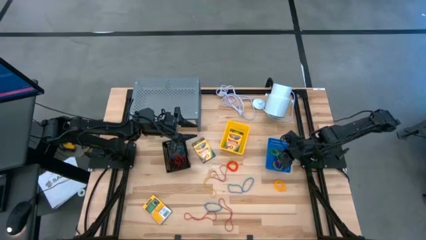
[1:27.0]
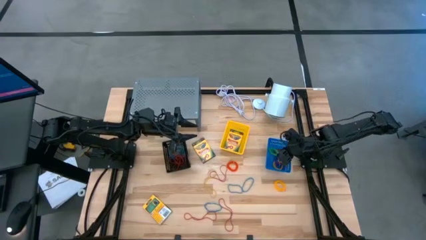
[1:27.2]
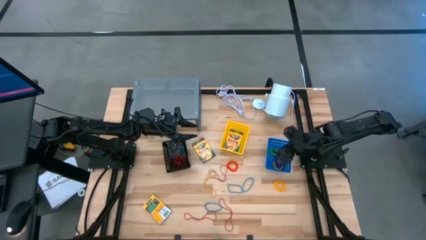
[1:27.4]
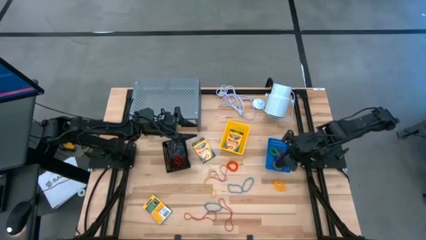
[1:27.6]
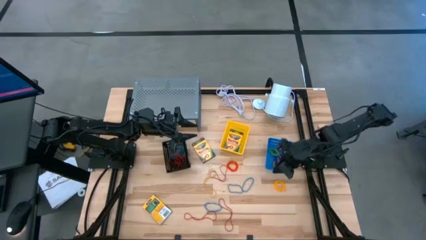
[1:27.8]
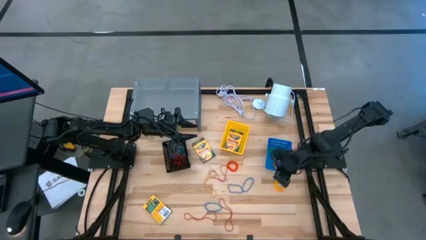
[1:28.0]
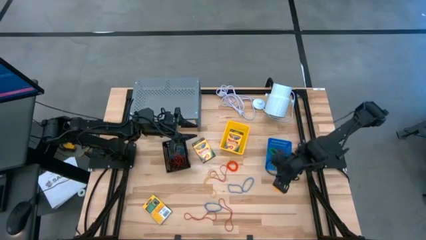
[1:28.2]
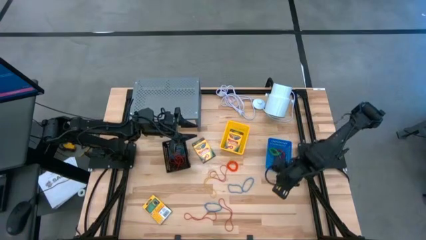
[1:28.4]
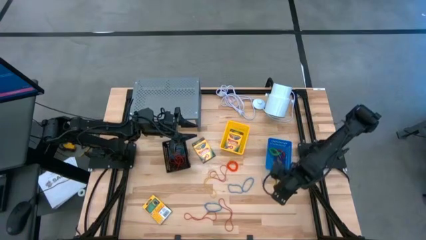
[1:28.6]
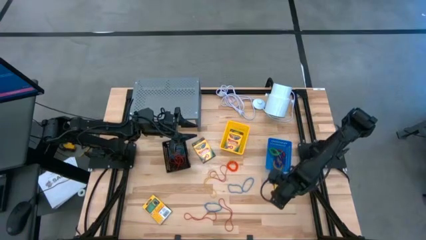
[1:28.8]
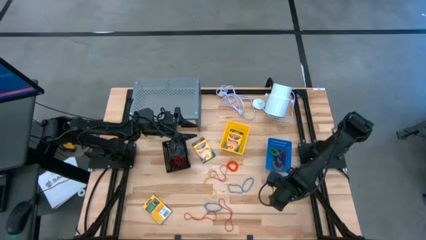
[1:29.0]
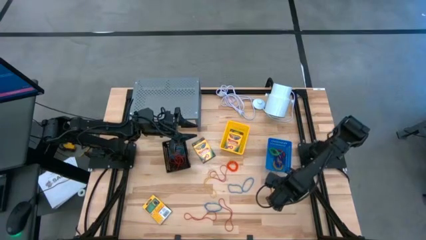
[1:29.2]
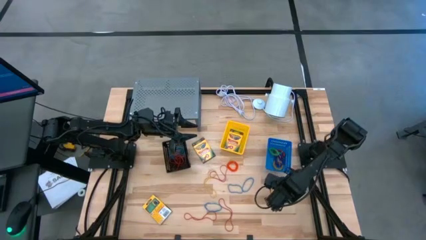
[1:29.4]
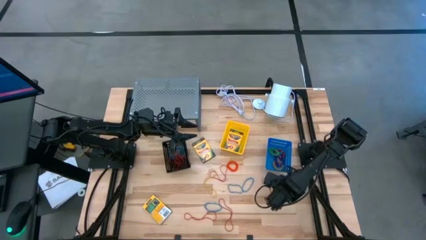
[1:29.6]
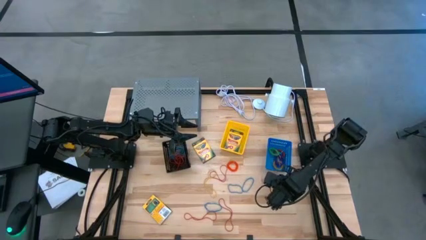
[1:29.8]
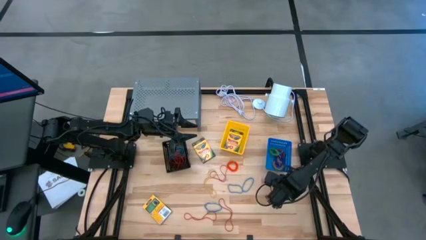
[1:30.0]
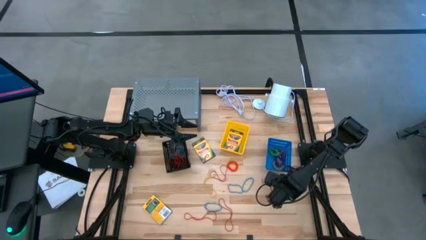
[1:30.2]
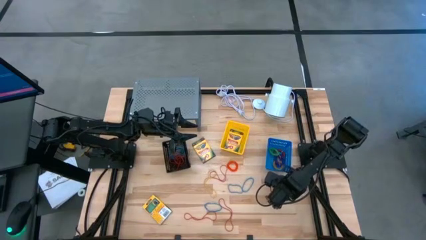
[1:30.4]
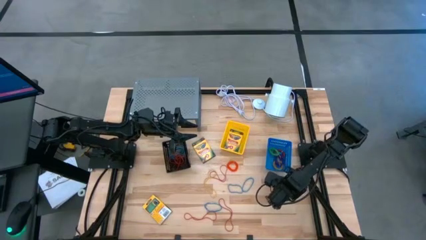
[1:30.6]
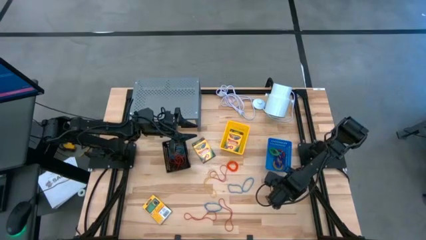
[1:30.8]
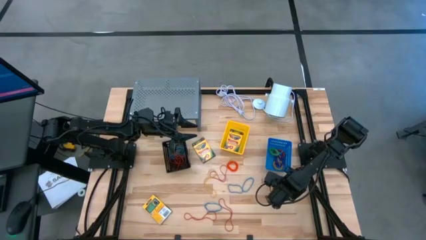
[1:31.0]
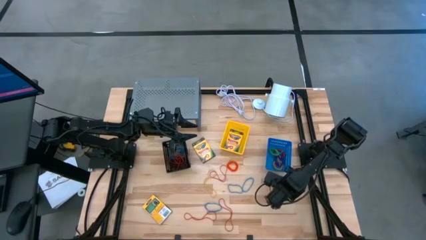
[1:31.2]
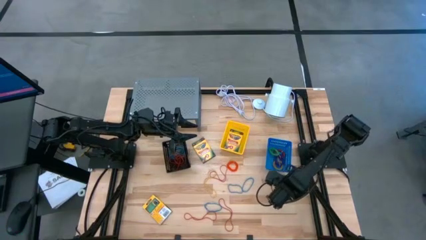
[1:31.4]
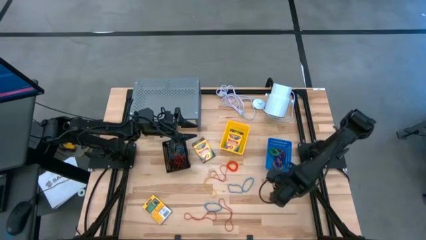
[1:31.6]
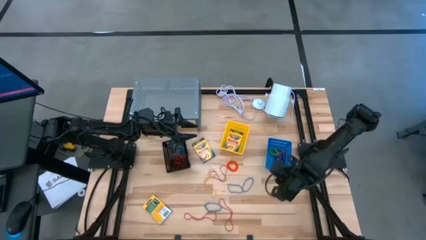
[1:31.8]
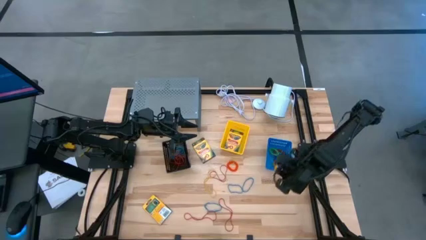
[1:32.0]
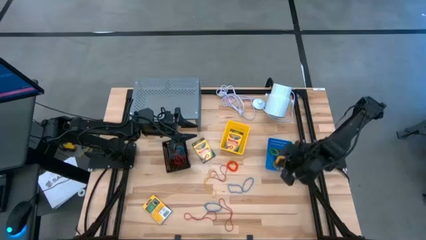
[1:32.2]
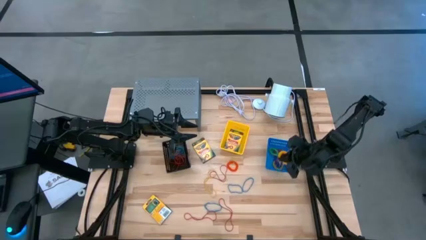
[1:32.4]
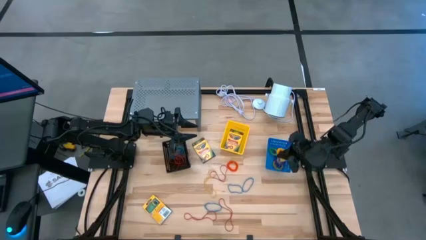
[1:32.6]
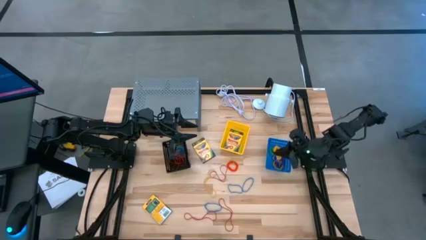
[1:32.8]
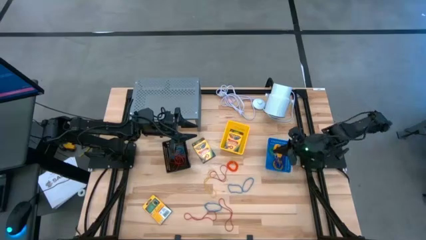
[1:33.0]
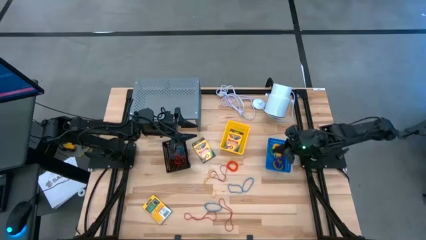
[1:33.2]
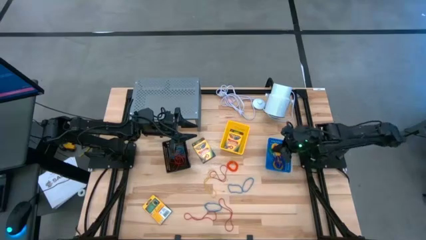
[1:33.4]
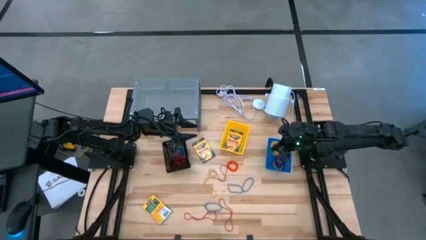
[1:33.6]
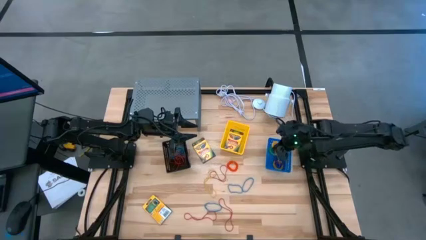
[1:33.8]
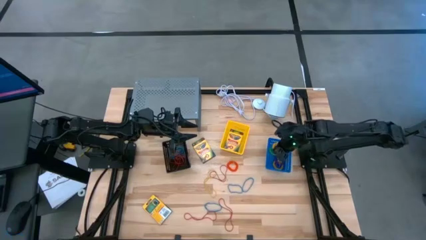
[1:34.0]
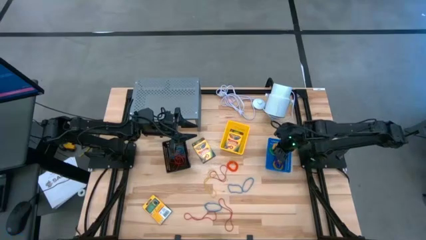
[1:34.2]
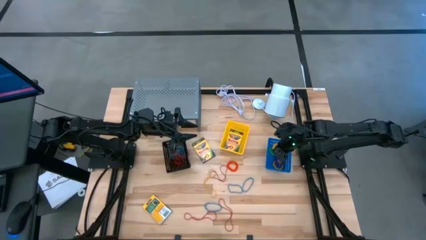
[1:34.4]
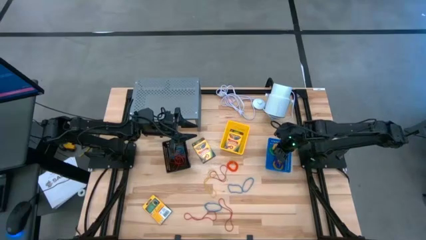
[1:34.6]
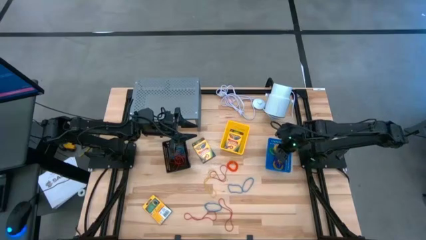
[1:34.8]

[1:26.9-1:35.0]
Task: Pick & Place Office Desk Supplies
Put the yellow spring keychain into the blue bin

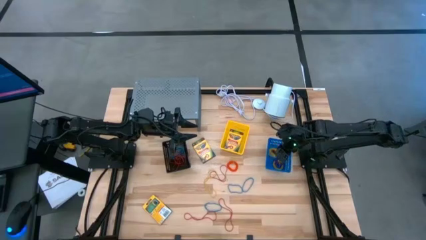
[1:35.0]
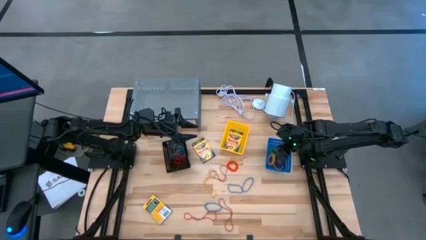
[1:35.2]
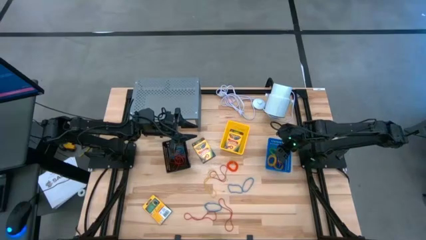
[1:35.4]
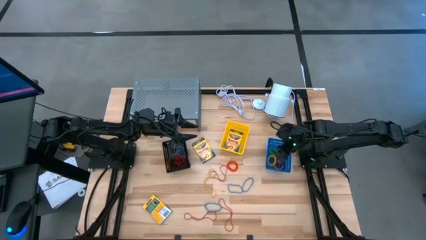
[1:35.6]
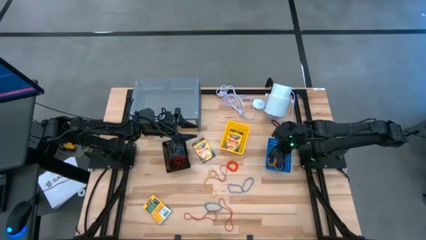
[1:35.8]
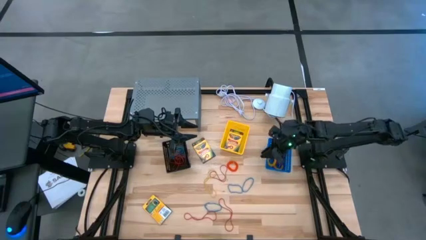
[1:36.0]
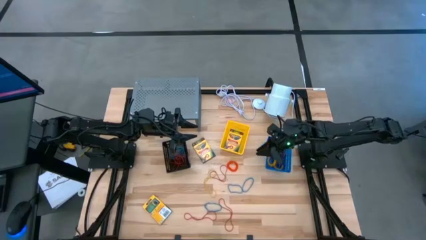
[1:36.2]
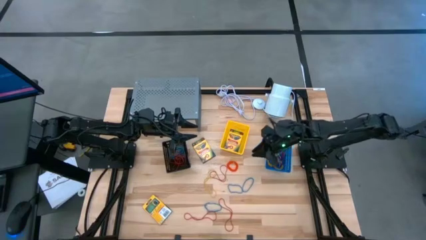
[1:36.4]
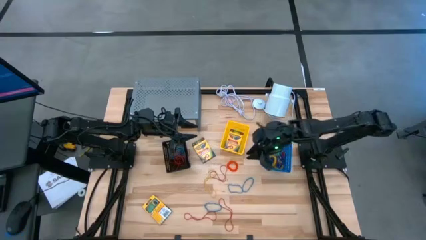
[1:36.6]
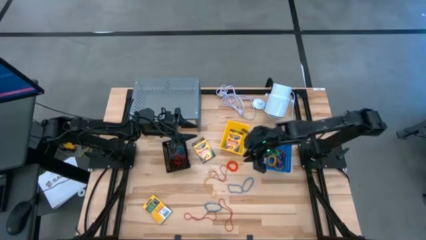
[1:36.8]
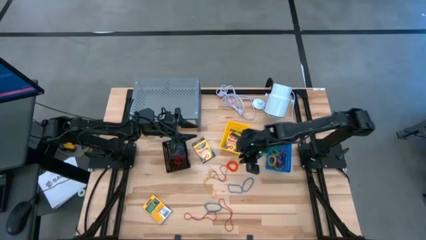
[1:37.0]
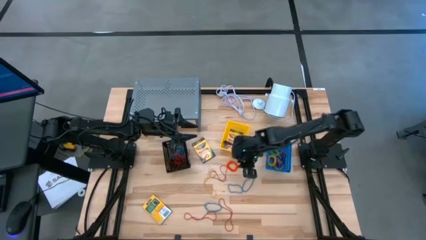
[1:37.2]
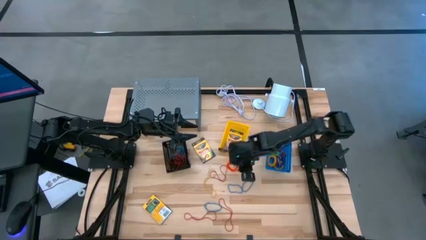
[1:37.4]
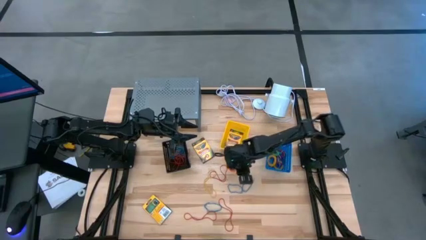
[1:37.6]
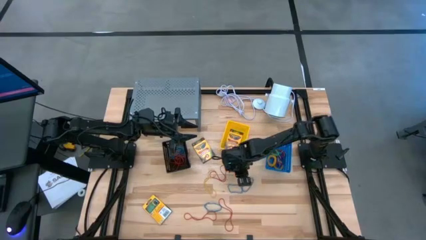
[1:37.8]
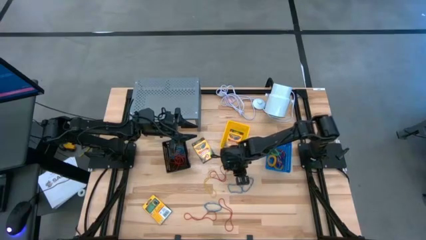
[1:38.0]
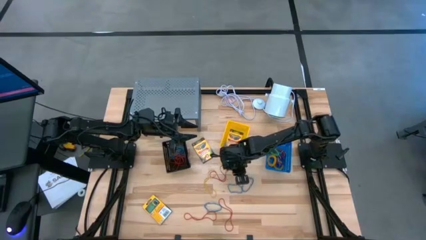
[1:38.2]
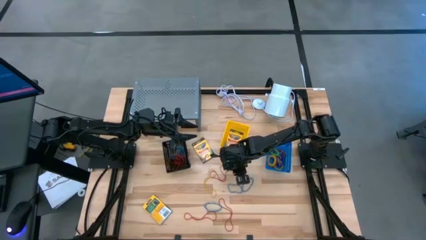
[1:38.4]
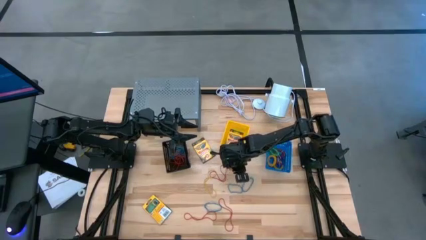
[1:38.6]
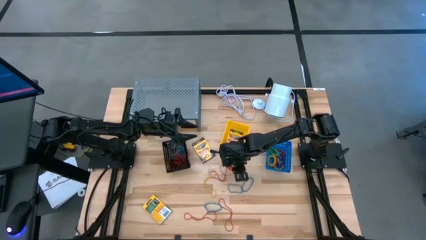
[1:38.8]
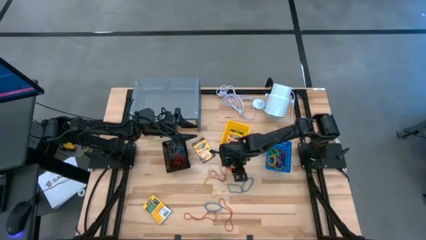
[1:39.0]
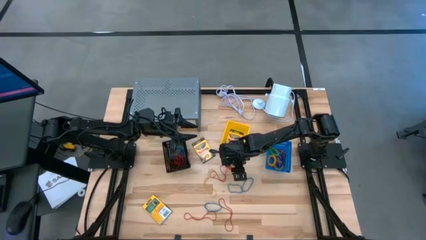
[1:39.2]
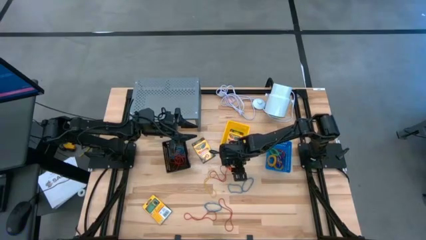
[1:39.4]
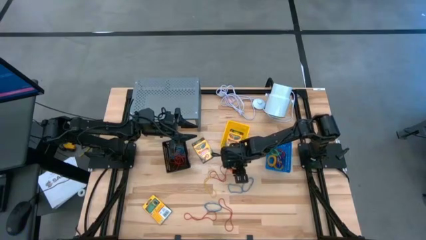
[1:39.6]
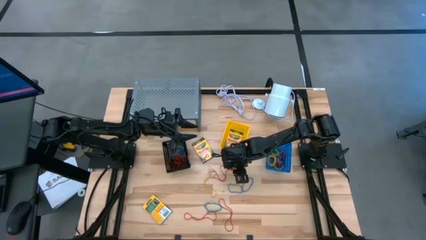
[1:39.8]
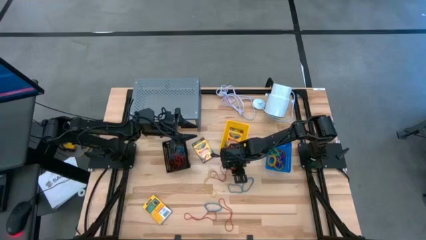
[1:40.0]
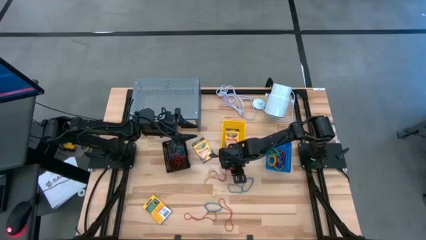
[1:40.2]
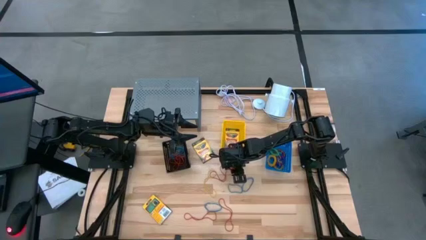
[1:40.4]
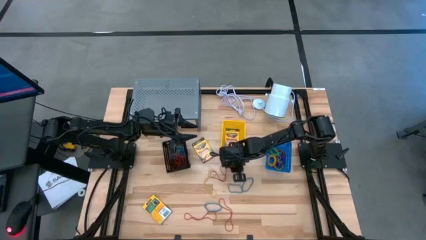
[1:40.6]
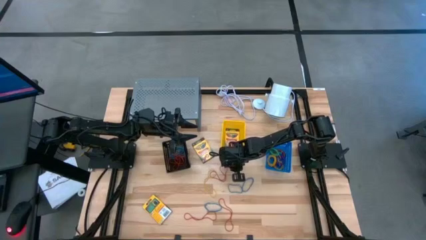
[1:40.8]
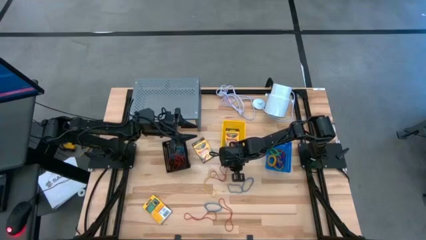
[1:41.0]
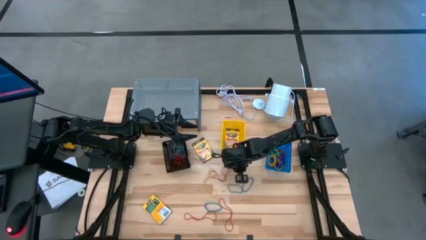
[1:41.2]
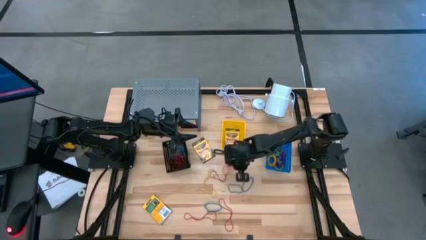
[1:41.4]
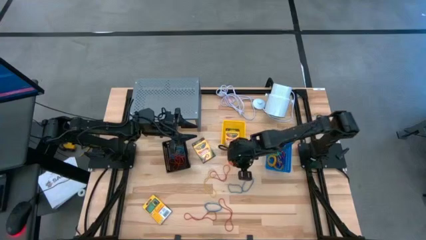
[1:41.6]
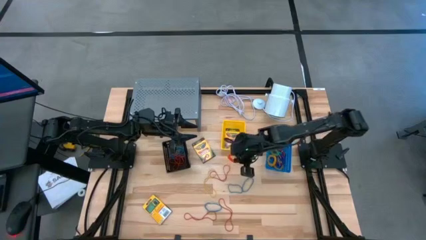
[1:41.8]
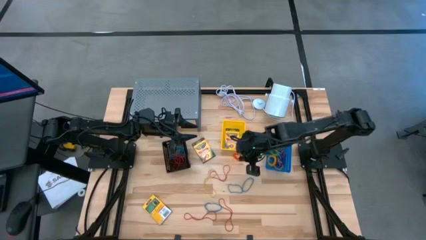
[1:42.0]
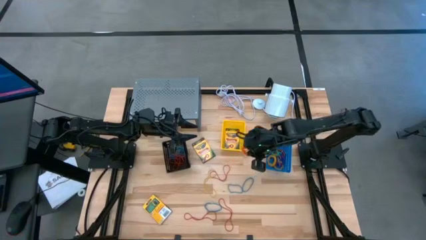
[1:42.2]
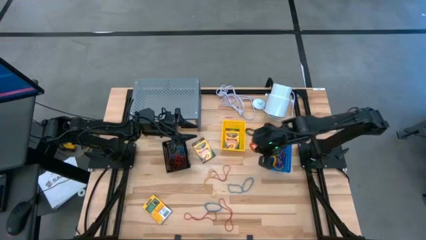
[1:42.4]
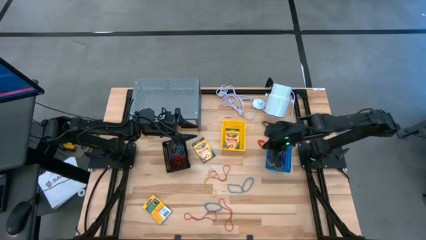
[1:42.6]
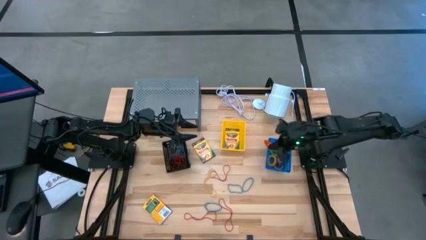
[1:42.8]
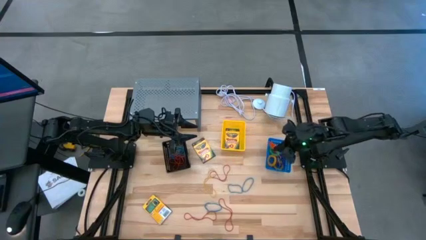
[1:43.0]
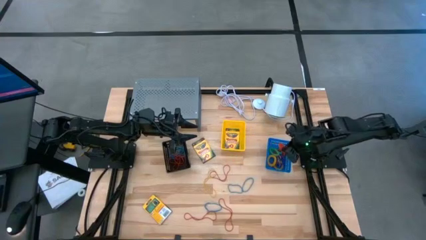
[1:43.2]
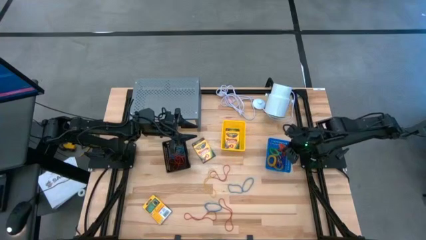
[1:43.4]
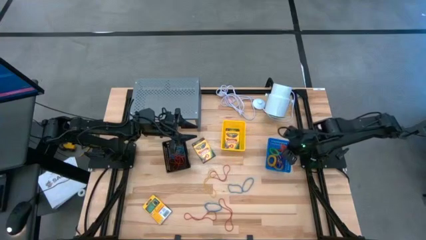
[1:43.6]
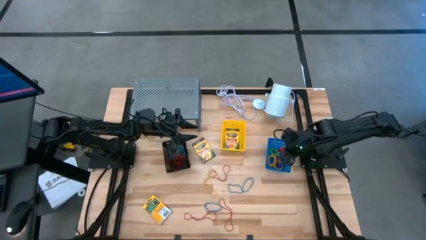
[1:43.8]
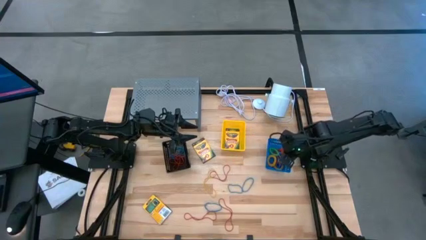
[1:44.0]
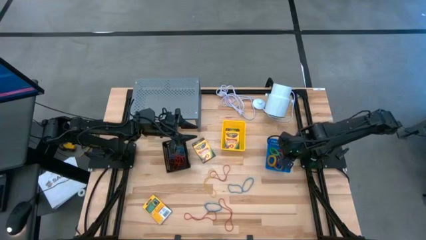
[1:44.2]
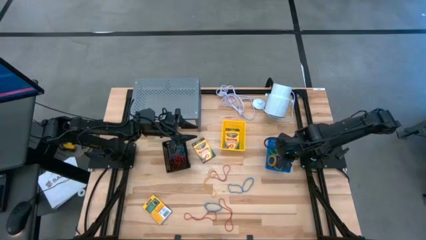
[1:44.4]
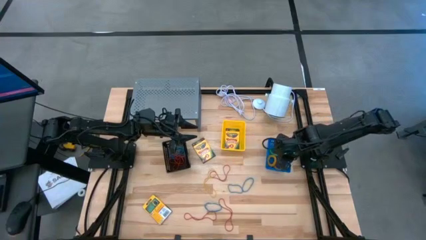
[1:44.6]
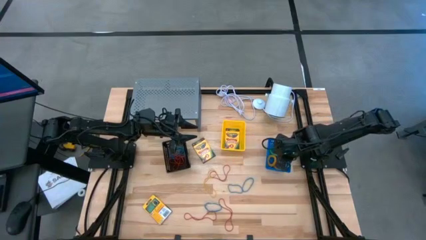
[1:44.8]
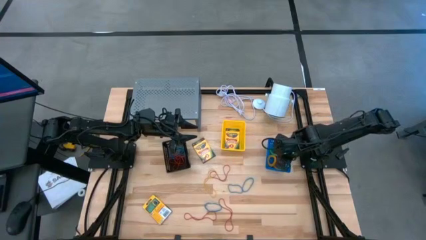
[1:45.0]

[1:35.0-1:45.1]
Put the orange spring keychain into the blue bin
